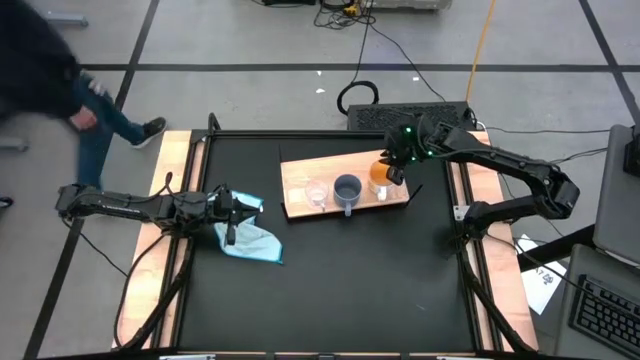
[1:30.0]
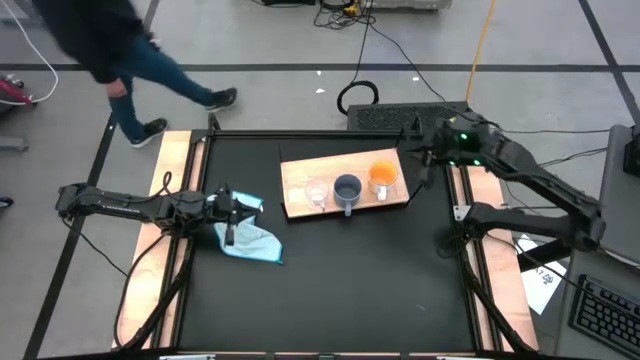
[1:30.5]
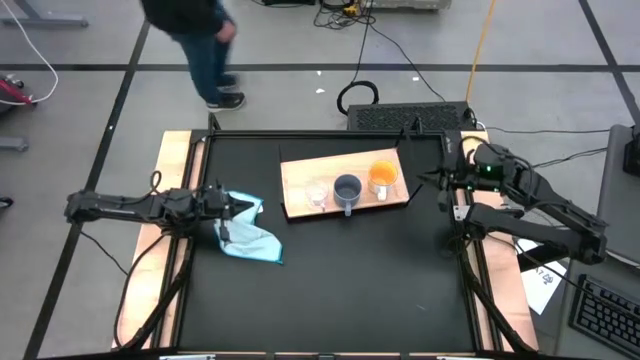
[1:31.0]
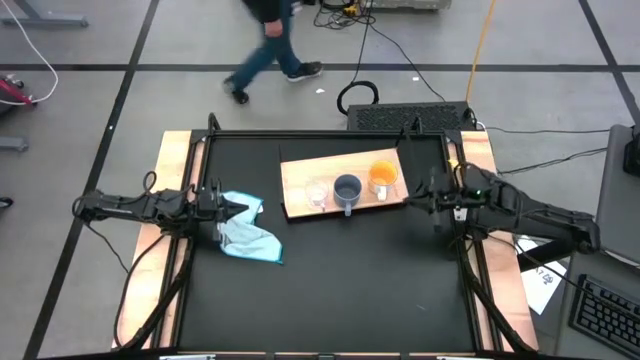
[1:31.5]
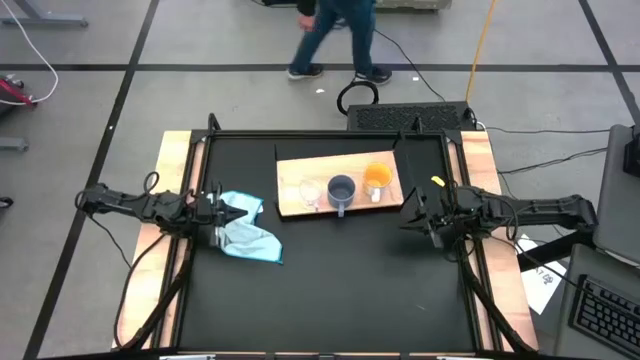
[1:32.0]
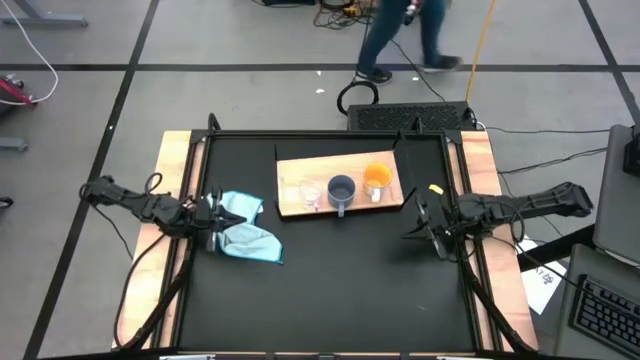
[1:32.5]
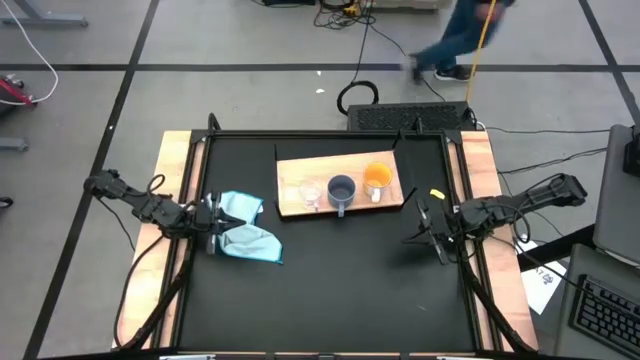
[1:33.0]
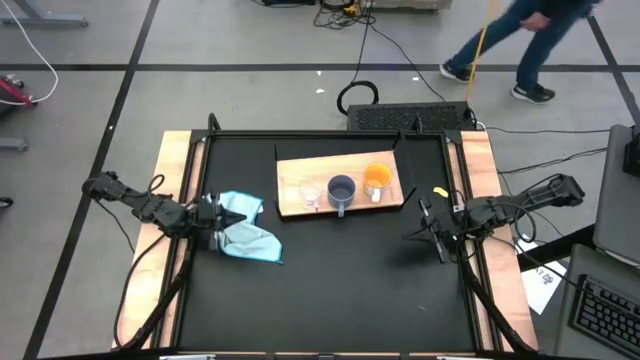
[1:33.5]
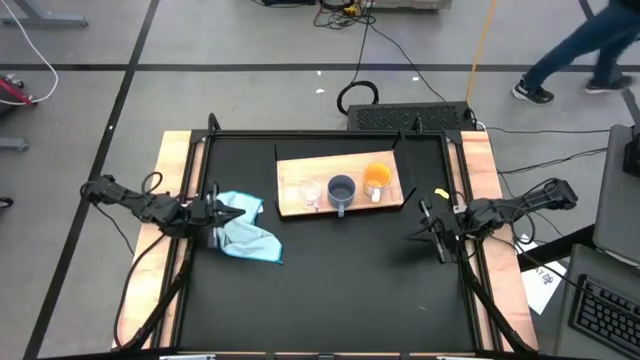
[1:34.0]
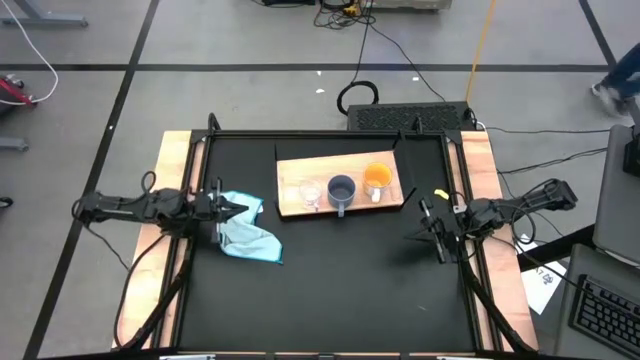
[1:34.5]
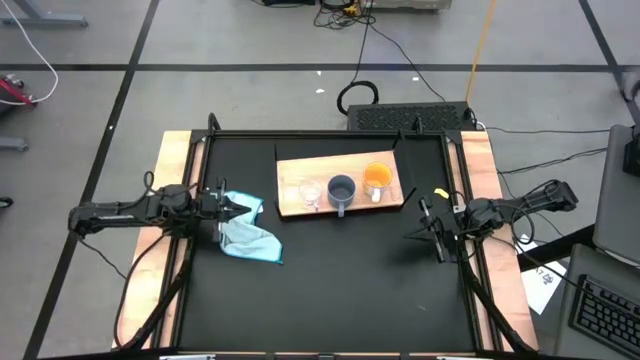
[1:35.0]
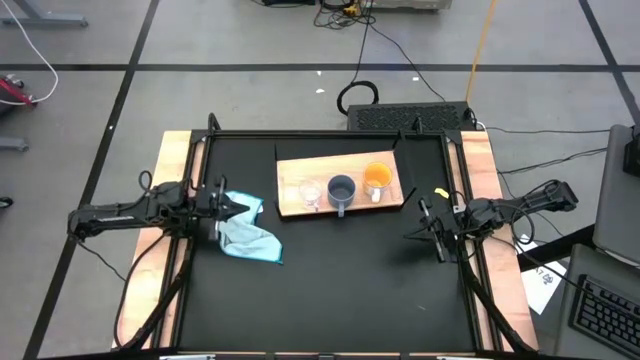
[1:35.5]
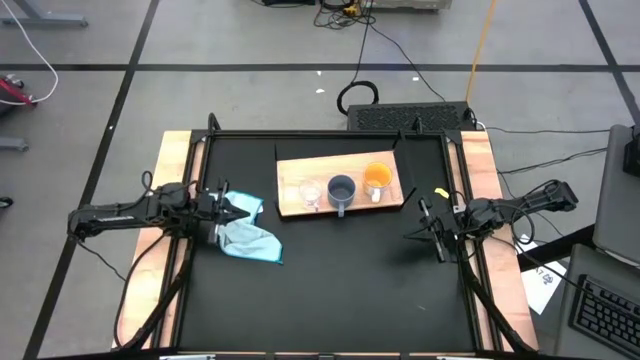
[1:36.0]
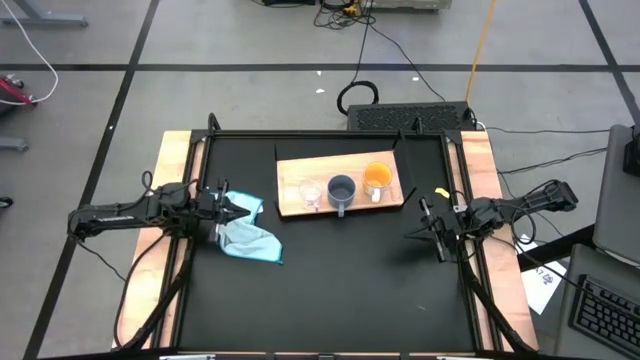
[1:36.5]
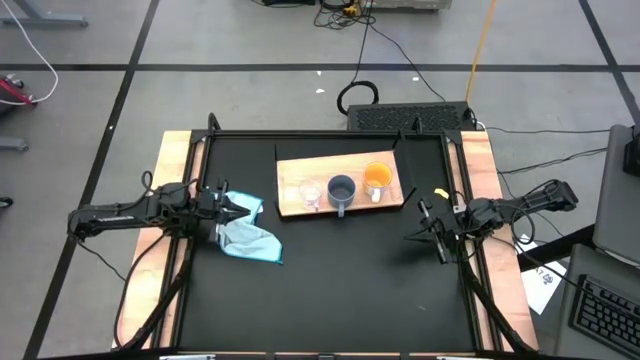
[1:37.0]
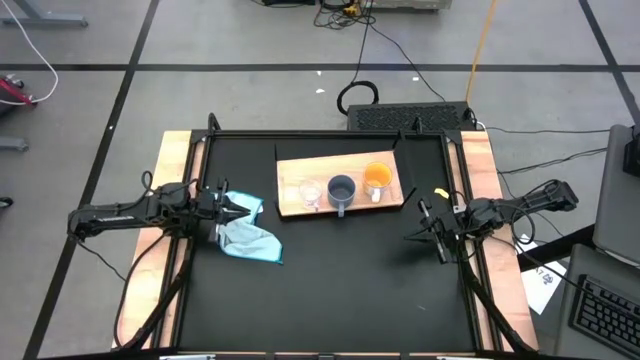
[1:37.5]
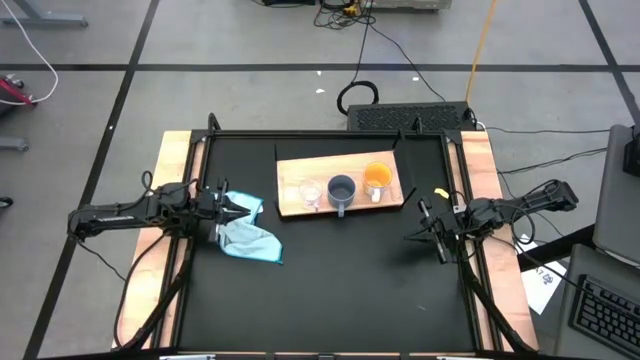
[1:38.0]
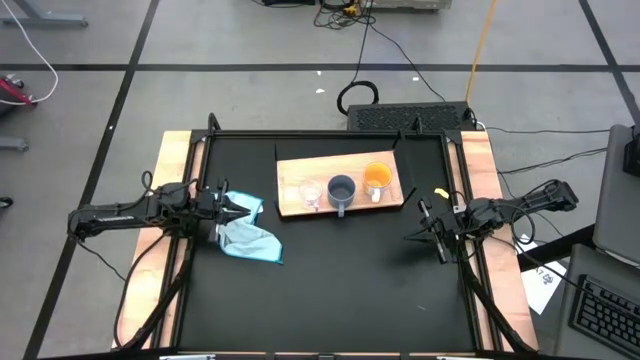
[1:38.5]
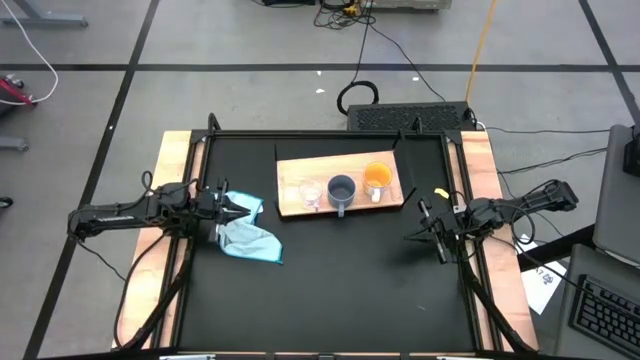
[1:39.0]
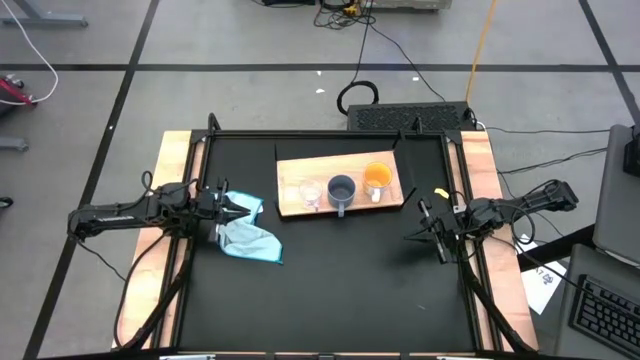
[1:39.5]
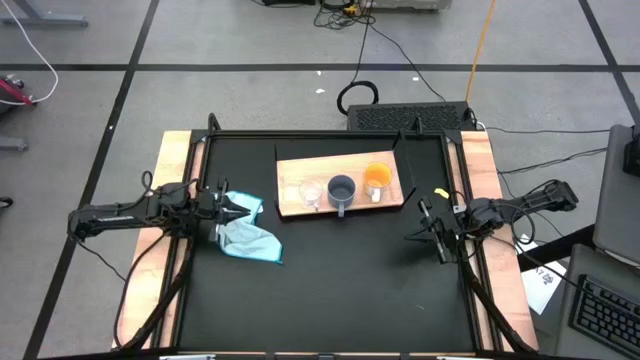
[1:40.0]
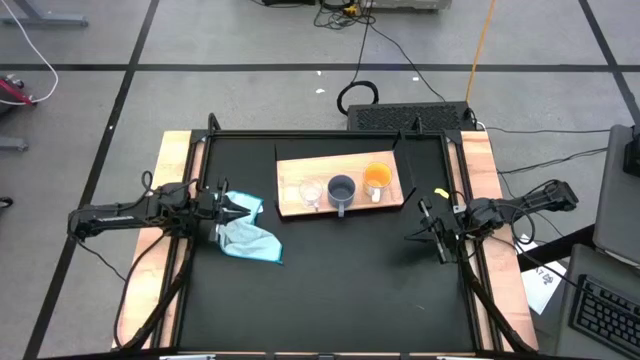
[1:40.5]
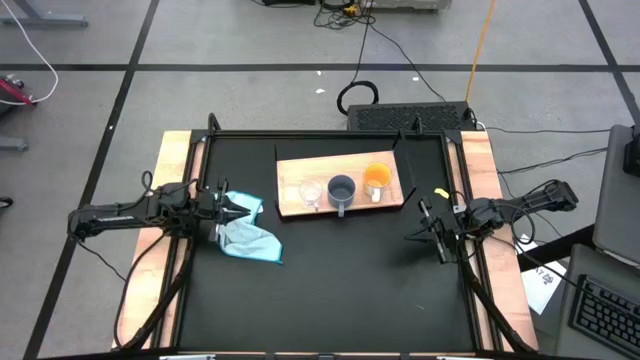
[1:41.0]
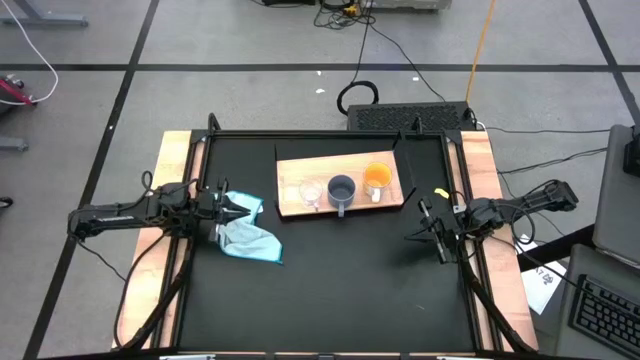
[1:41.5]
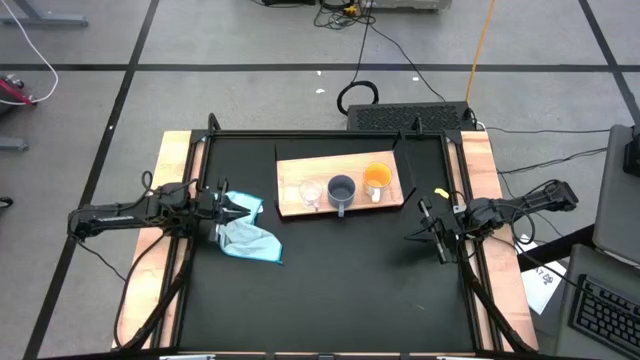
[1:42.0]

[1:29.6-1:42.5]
Task: Stack small to large cups/mugs on shelf
Return to Home Position

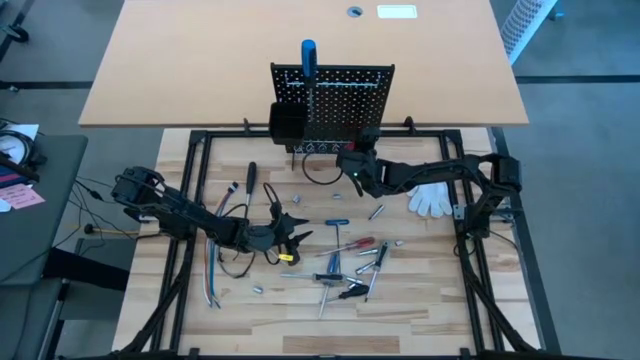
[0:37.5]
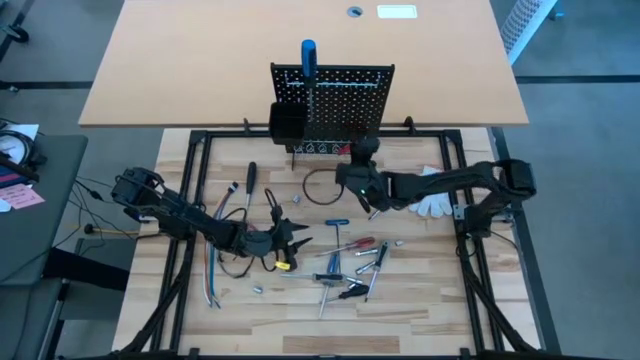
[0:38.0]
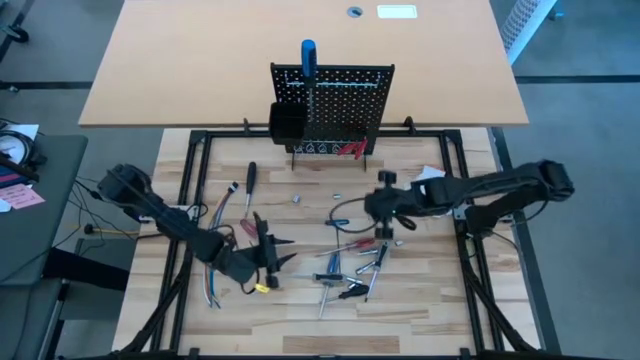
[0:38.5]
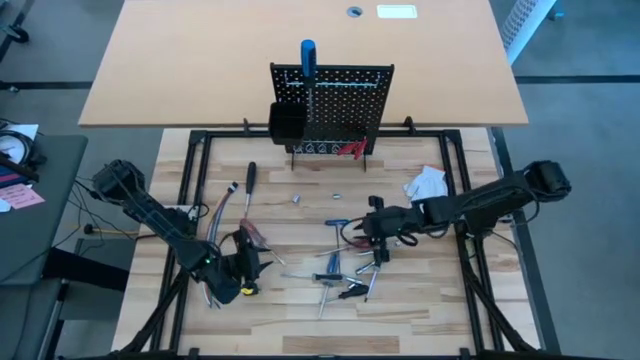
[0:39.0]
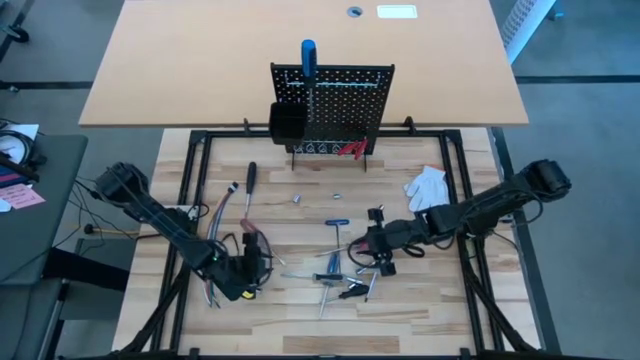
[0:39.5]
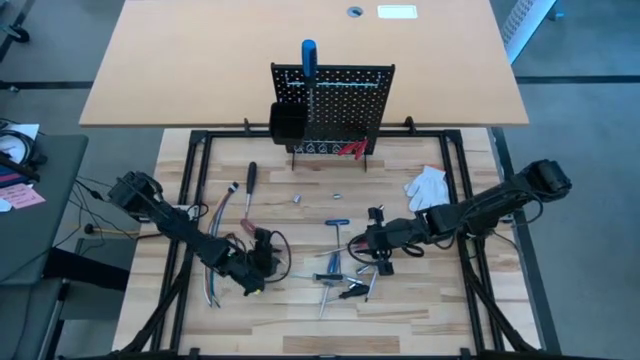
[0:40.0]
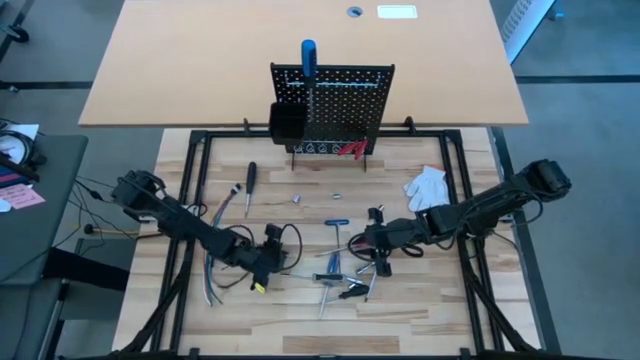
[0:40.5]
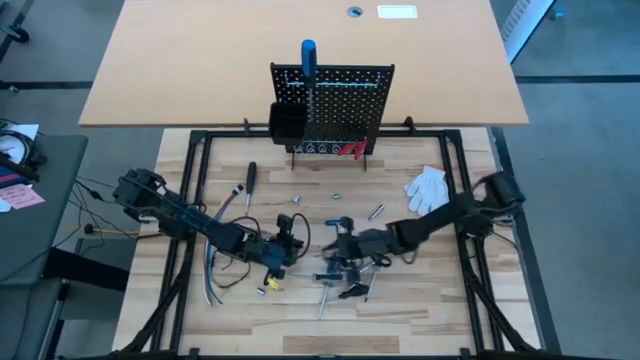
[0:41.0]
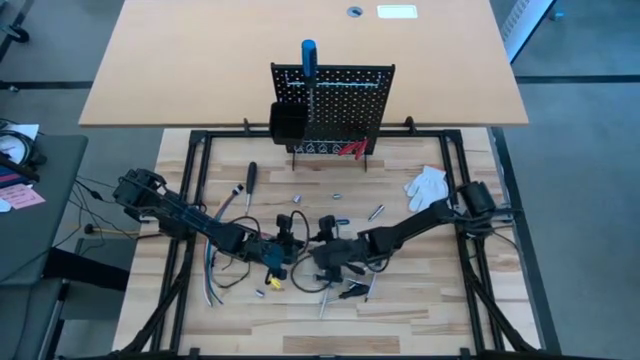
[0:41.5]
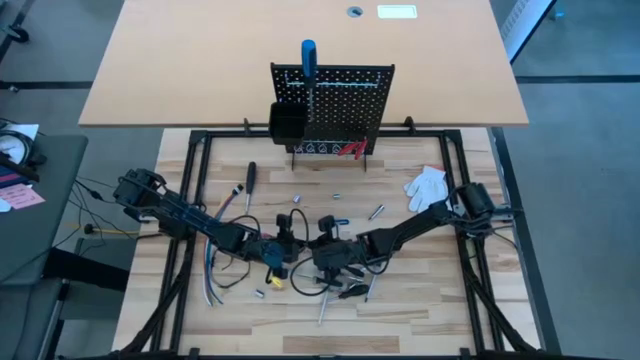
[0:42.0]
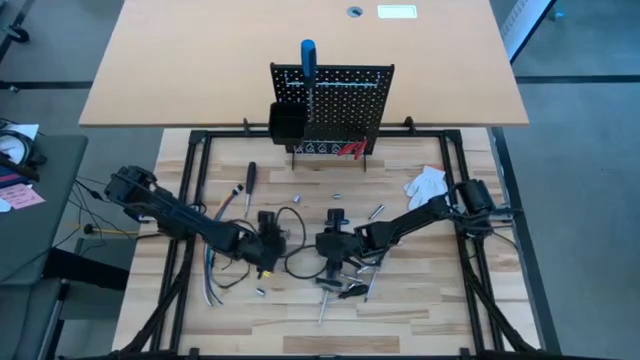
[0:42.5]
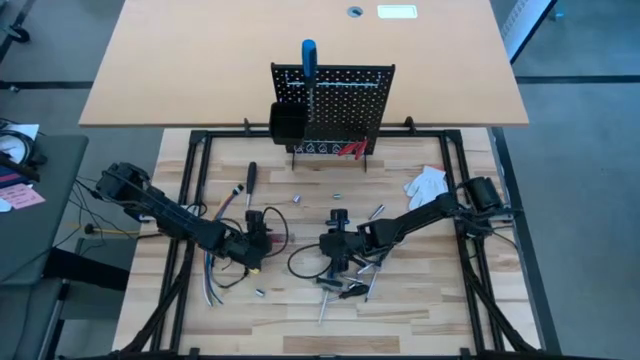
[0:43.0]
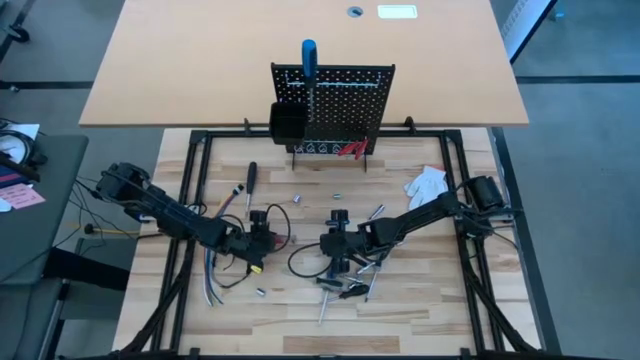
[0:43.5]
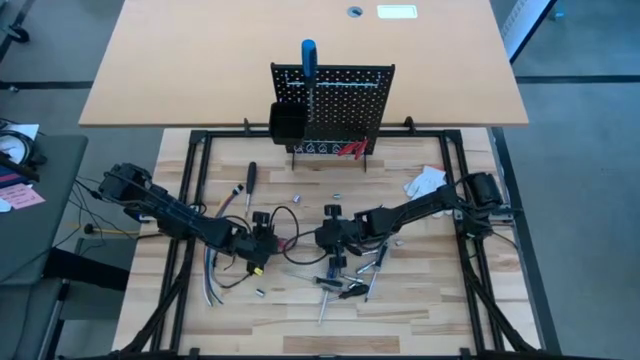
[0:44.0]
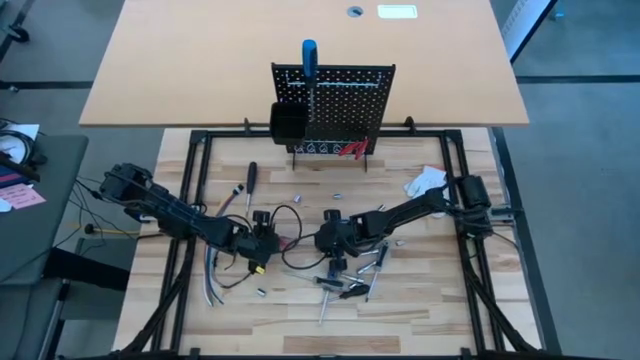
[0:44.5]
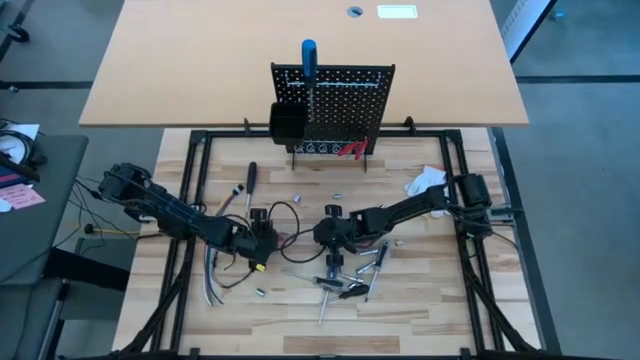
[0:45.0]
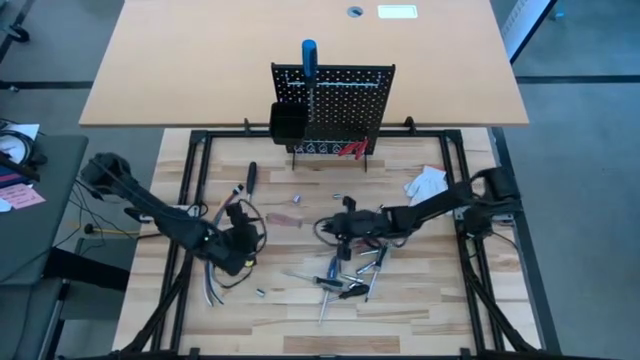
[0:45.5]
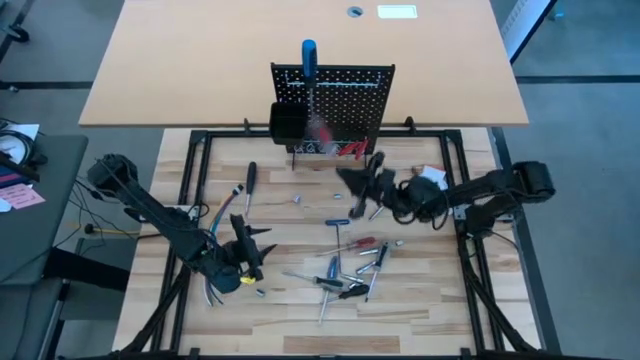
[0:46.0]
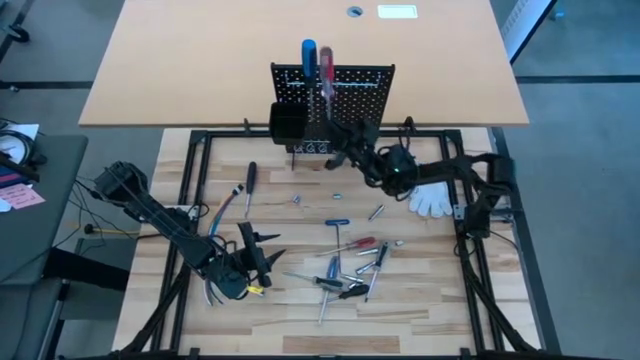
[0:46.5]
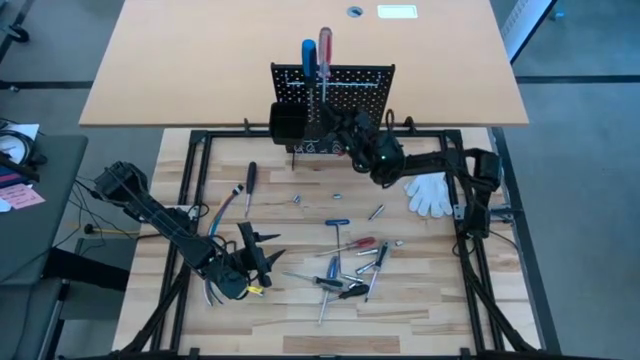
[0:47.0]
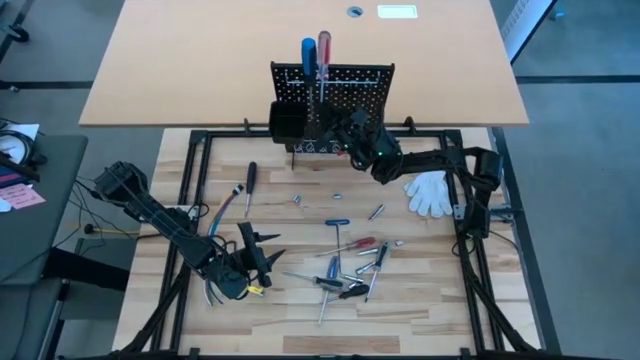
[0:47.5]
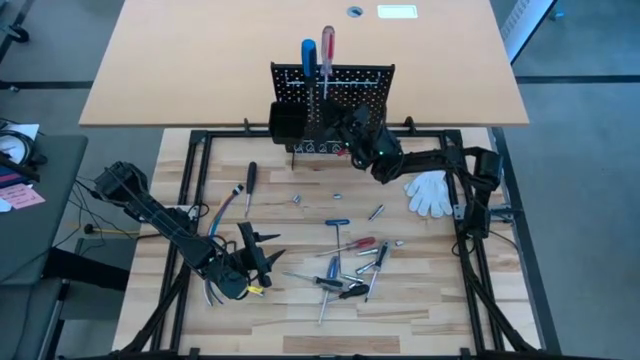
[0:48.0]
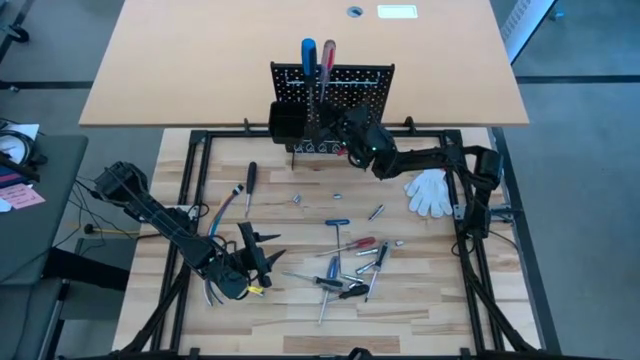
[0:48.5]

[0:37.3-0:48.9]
Task: Hang tools onto peg board
Hang the red screwdriver on the black pegboard
